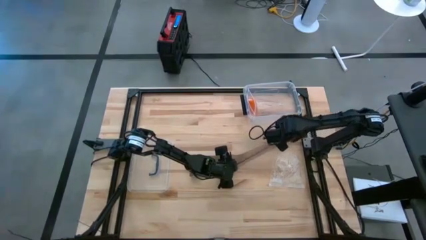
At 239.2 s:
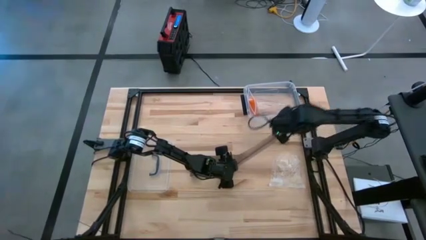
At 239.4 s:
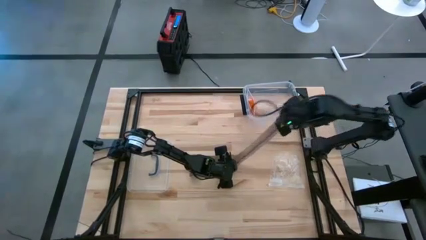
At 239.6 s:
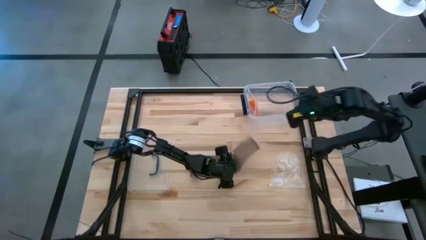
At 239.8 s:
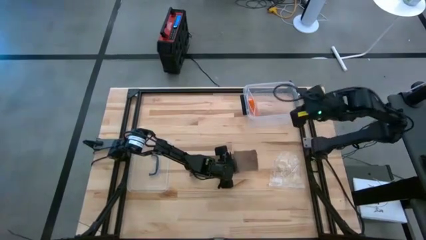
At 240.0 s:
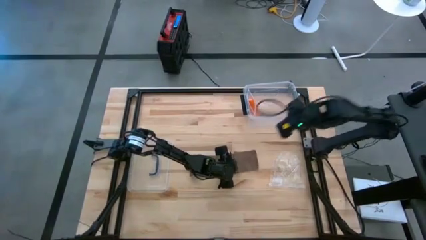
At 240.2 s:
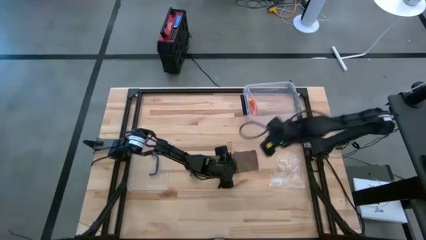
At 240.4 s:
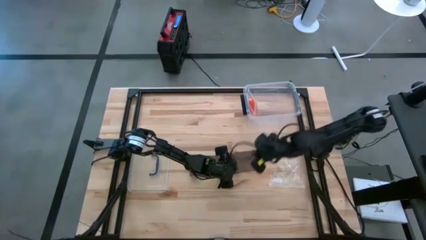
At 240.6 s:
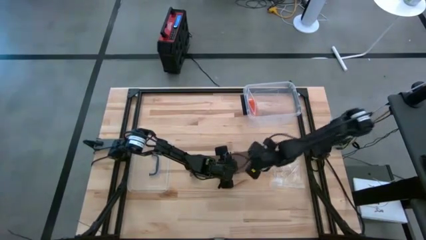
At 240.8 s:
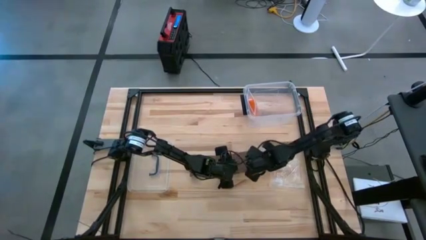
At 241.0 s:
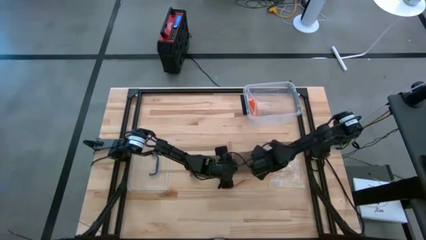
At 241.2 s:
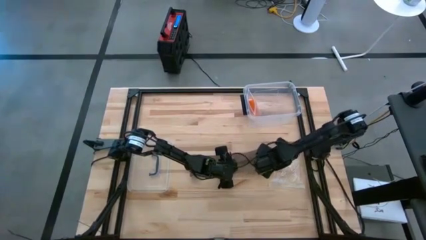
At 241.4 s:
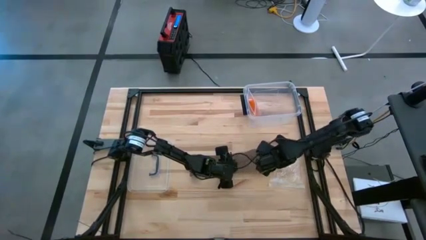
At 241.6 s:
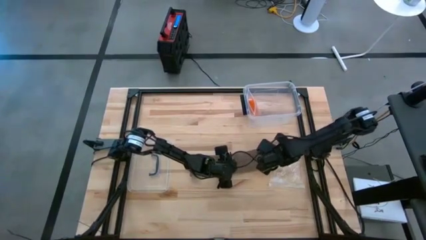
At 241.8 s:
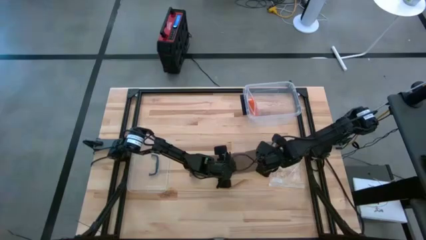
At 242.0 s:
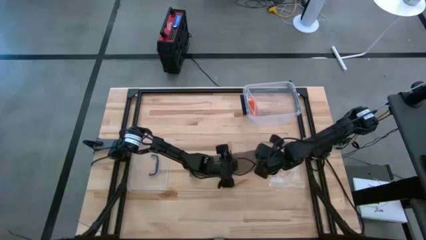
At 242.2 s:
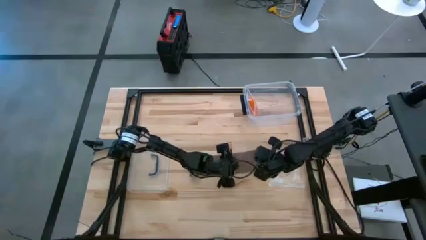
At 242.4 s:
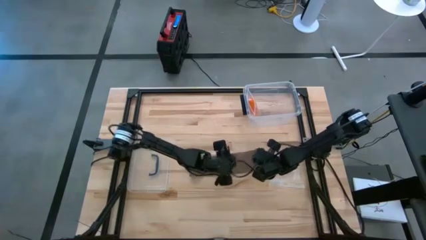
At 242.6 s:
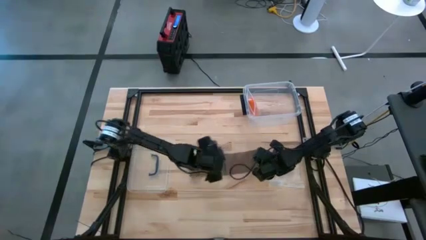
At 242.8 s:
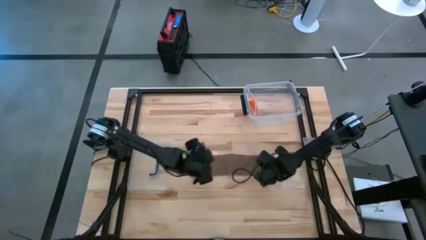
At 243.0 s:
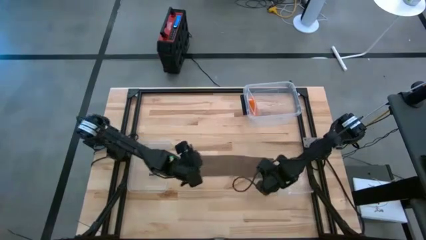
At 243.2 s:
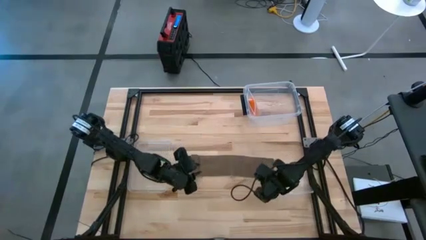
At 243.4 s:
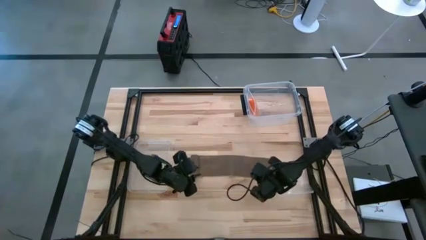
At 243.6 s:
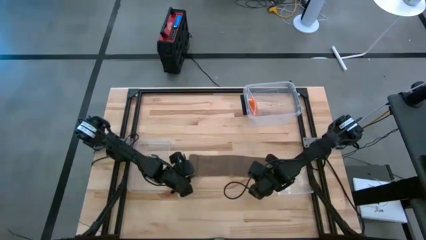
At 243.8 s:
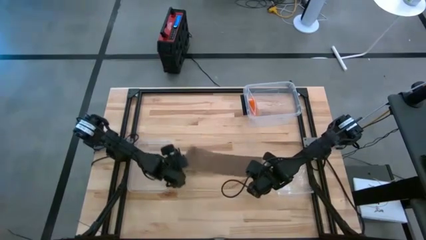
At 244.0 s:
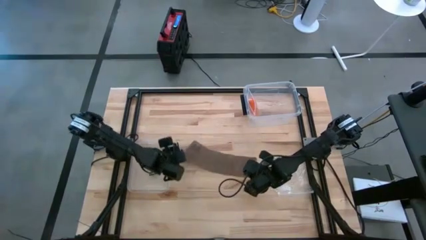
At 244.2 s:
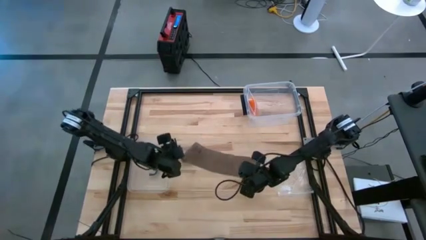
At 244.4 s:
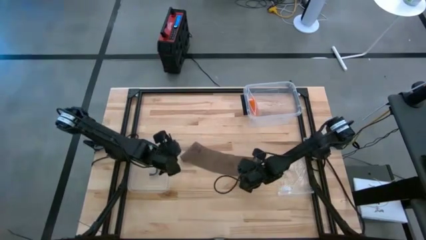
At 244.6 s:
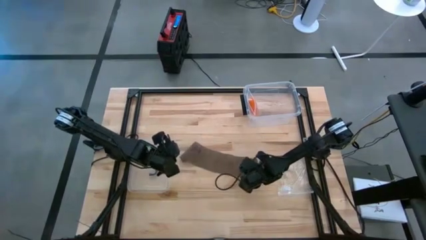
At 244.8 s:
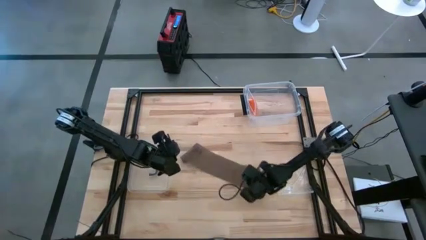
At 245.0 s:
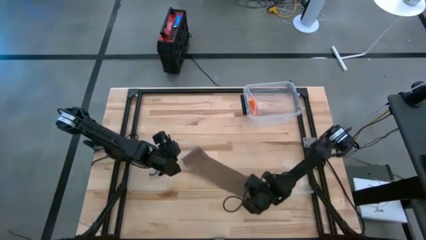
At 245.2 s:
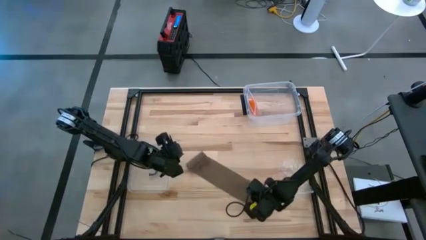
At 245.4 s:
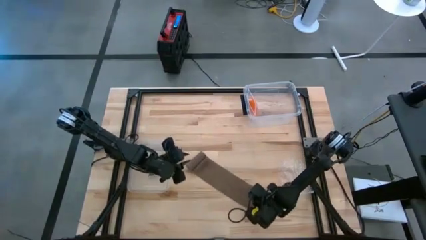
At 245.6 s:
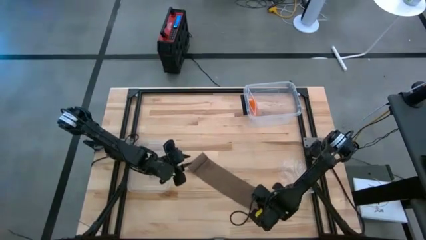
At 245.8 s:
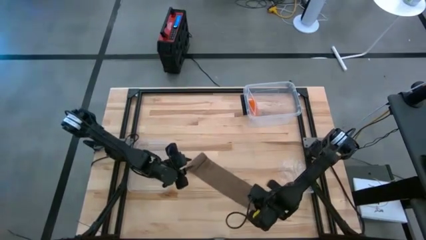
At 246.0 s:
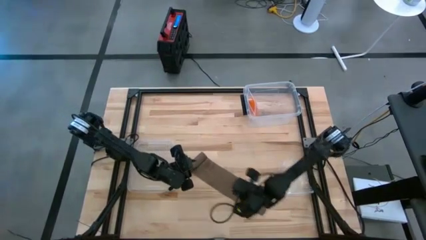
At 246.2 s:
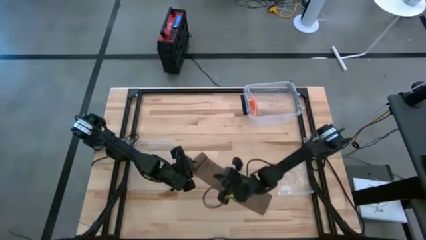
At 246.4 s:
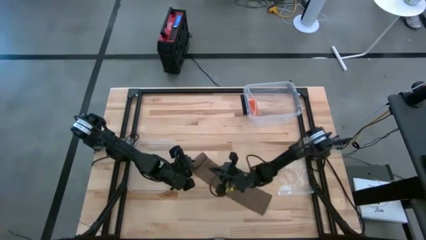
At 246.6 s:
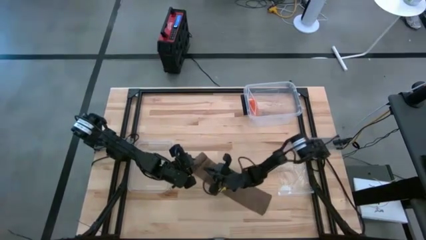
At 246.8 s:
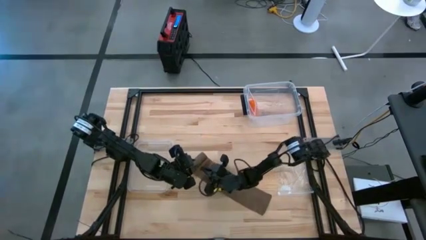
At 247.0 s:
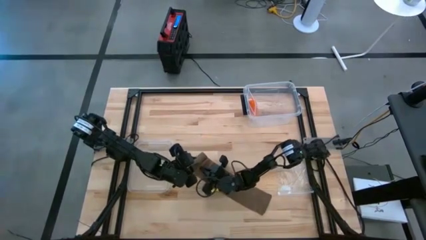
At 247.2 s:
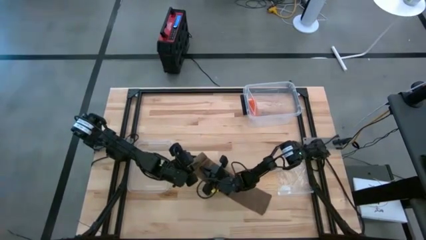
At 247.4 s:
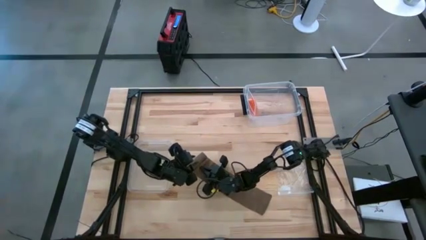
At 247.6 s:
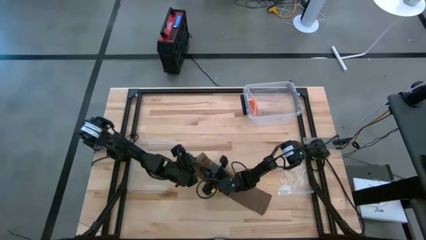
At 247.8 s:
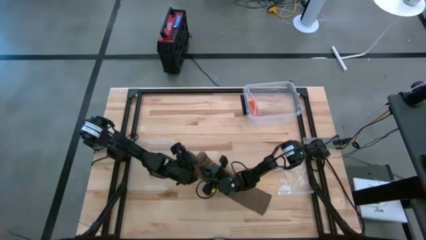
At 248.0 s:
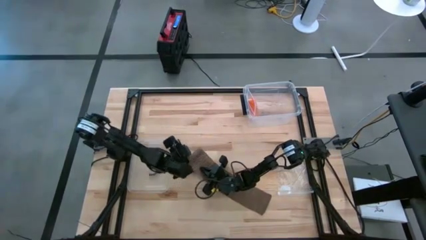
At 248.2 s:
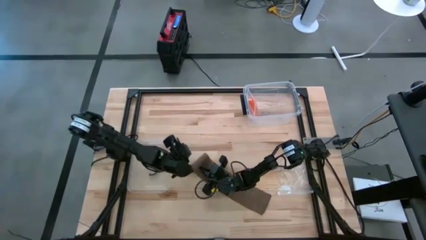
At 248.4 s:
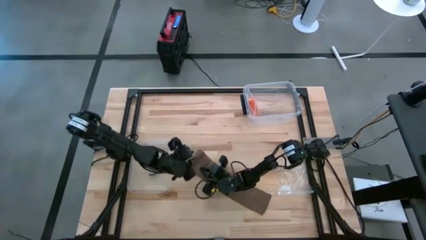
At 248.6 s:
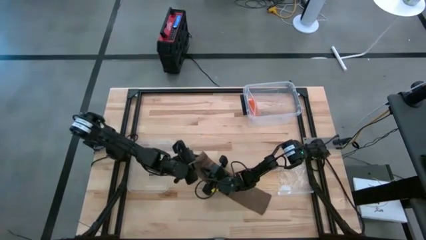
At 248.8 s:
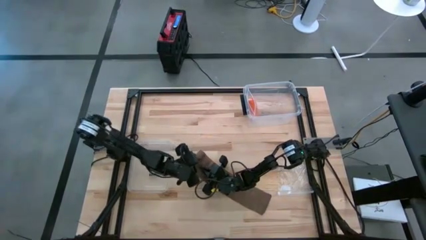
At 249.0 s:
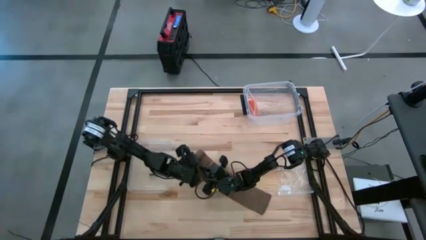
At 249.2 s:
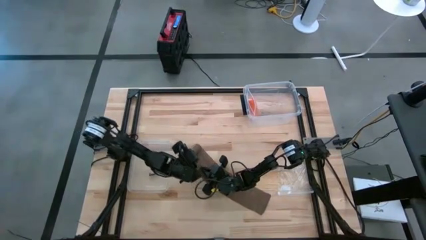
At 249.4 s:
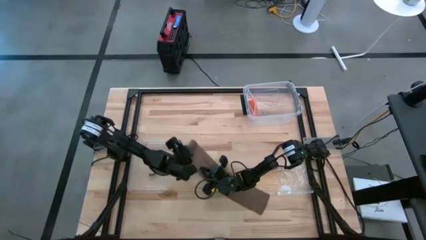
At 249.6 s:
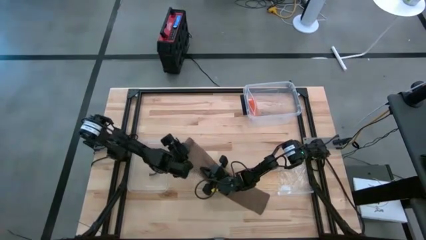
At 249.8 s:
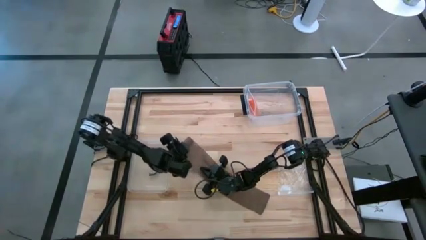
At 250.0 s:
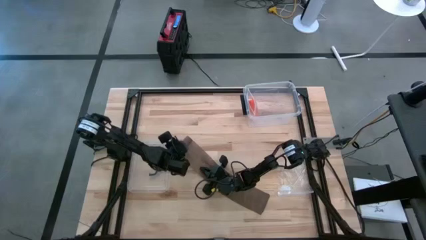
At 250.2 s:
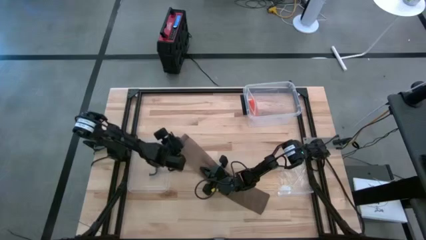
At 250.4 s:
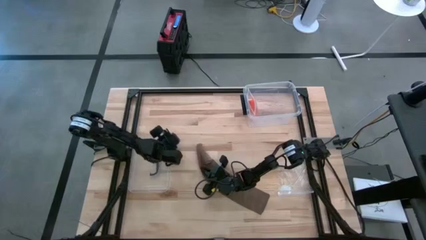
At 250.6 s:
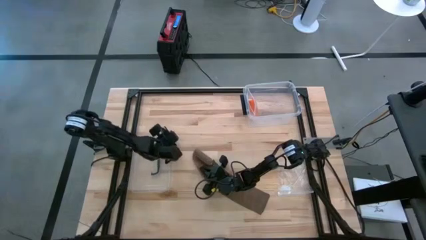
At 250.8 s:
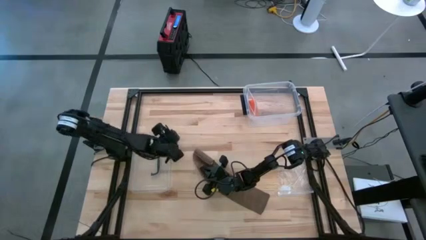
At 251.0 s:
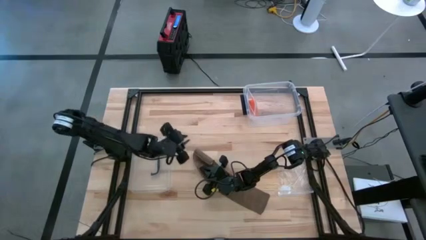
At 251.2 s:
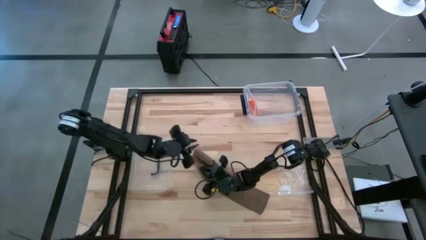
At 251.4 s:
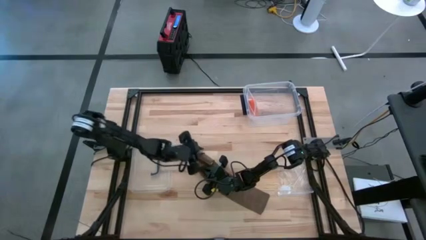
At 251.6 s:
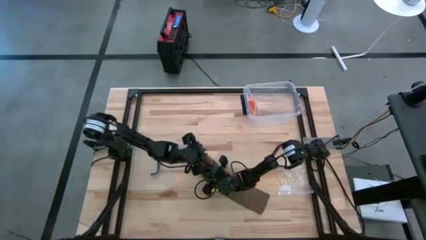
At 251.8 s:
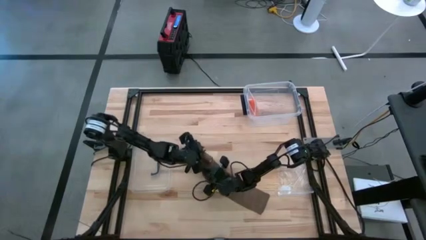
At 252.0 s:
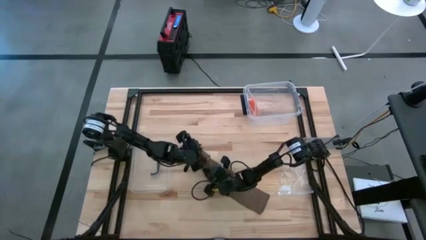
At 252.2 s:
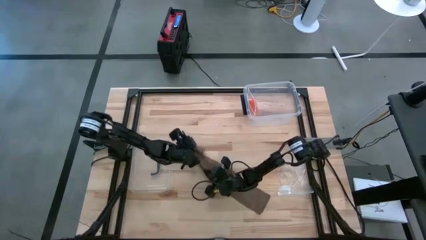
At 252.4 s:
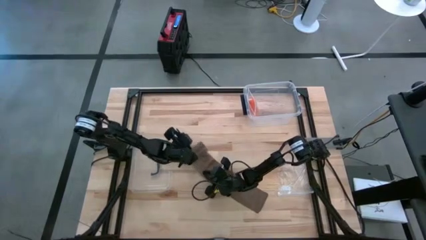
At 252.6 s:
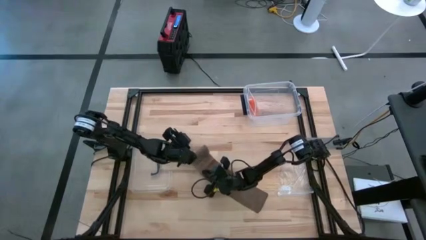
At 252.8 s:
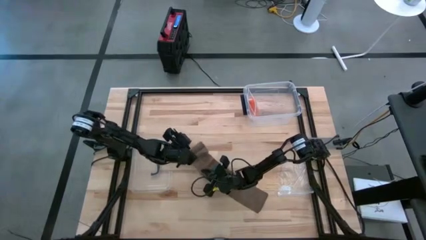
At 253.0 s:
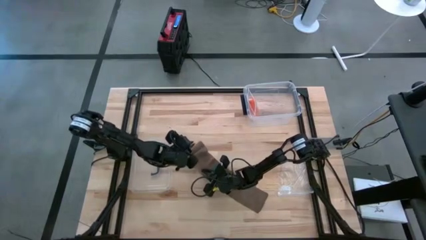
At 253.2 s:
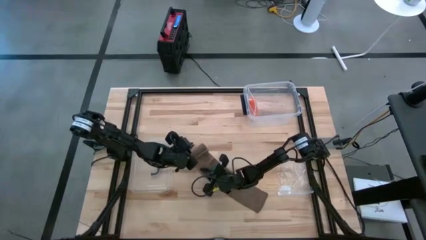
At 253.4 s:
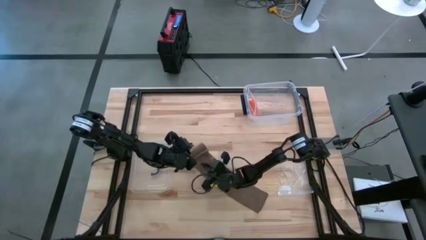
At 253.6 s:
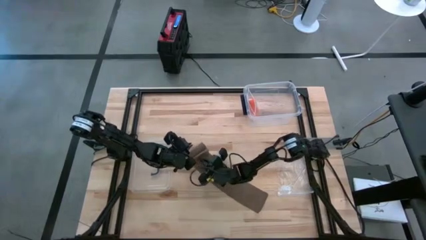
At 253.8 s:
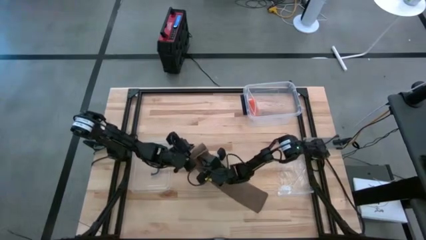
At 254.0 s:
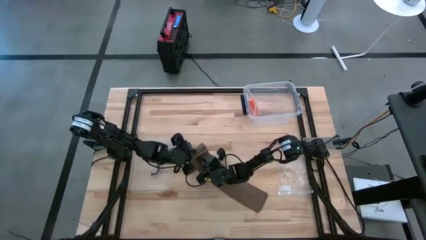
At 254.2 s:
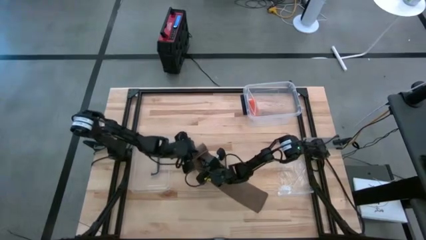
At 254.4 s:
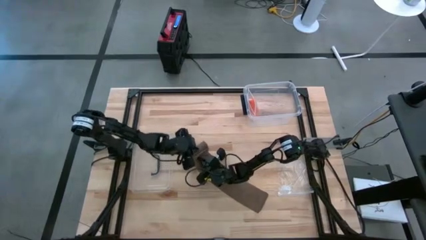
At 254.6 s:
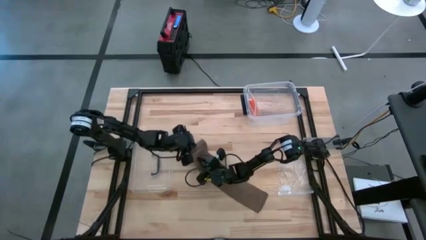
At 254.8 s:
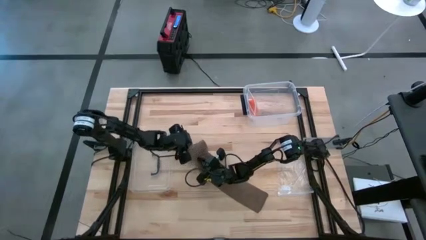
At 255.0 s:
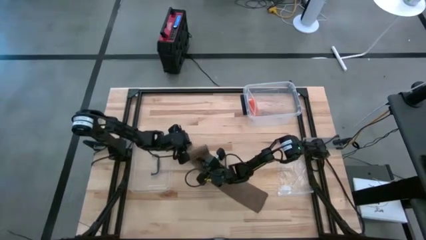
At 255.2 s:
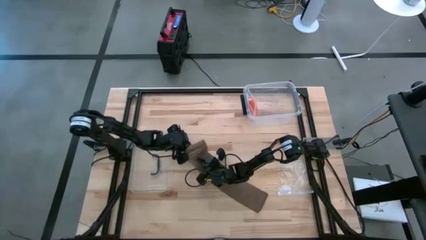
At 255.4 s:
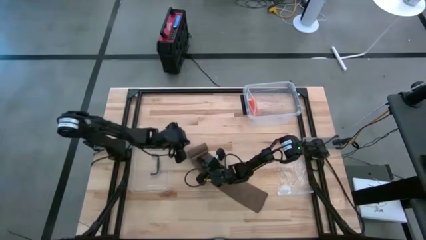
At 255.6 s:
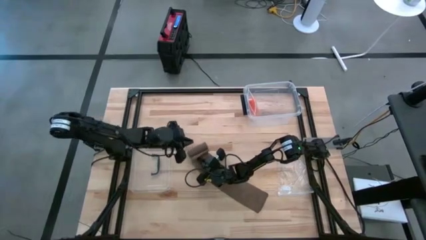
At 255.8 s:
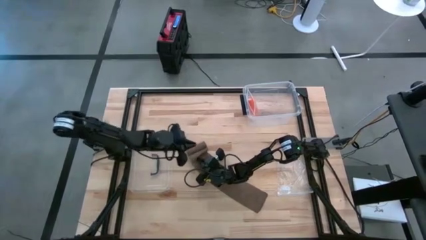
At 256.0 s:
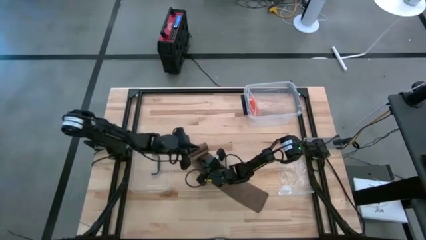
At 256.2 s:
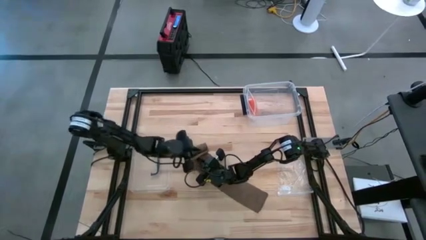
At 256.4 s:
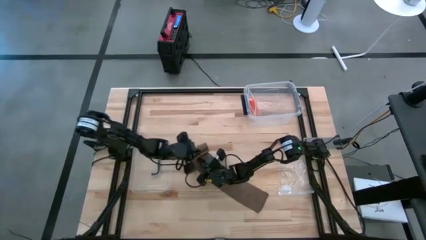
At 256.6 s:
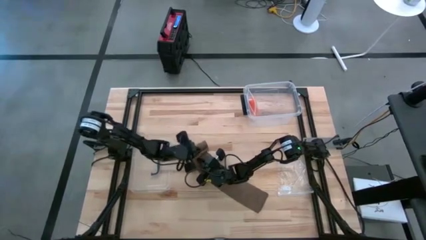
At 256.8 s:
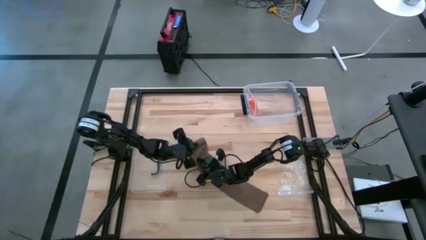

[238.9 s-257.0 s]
Task: Roll bandage
Roll the brown bandage
